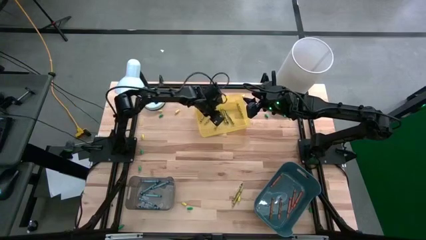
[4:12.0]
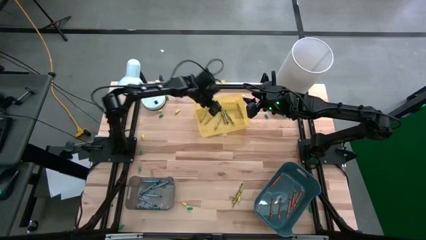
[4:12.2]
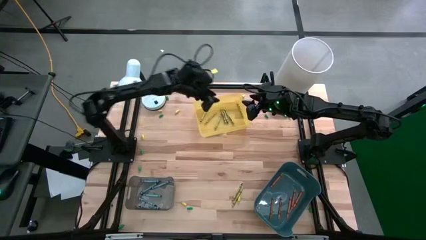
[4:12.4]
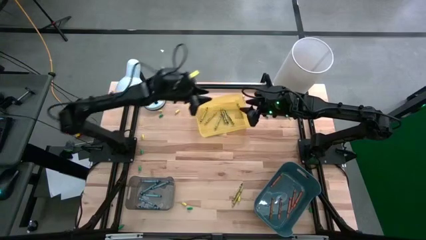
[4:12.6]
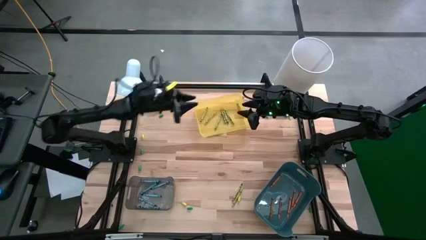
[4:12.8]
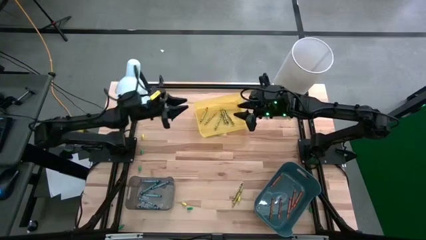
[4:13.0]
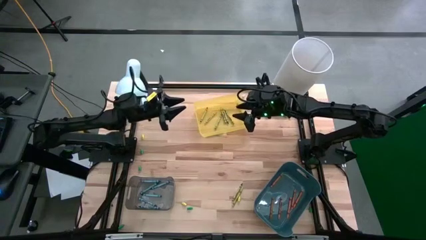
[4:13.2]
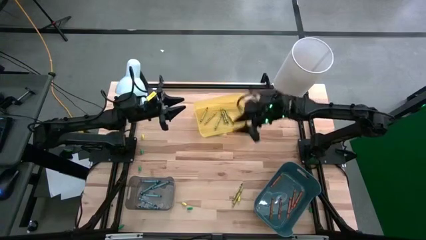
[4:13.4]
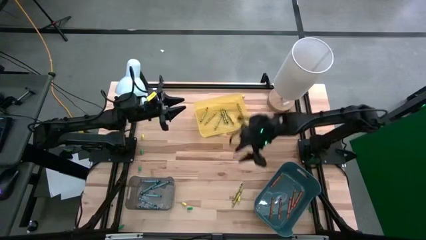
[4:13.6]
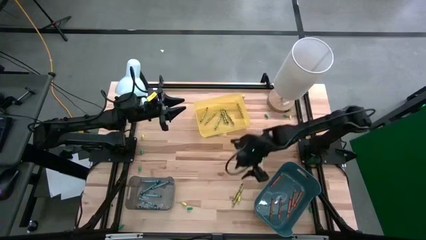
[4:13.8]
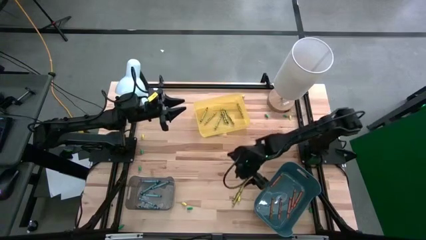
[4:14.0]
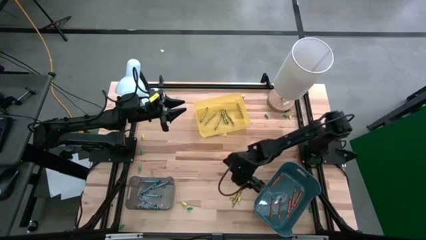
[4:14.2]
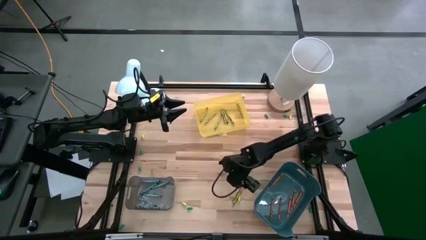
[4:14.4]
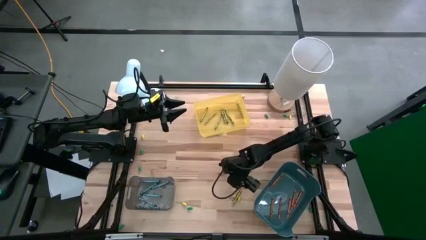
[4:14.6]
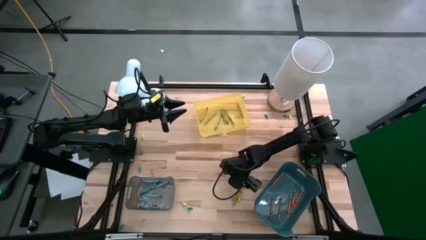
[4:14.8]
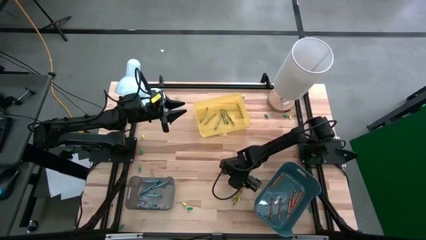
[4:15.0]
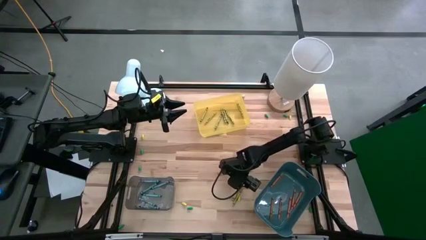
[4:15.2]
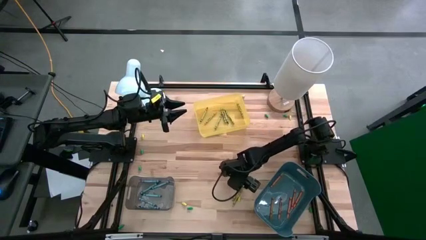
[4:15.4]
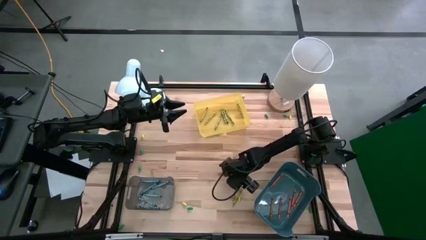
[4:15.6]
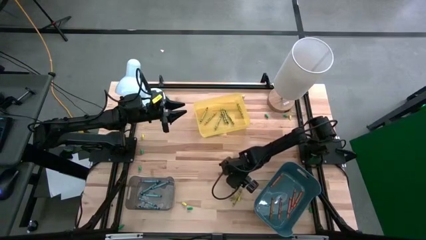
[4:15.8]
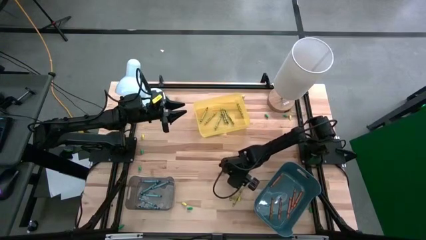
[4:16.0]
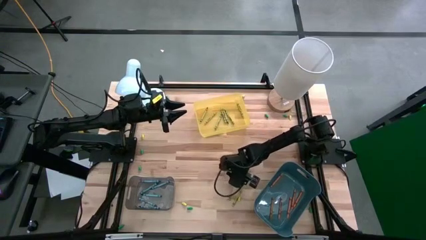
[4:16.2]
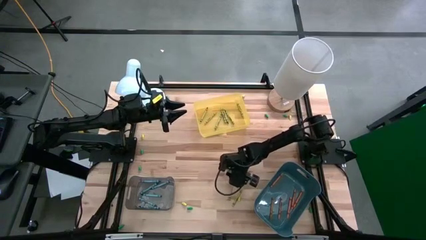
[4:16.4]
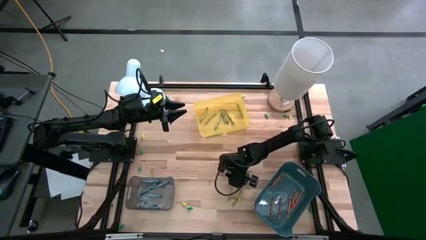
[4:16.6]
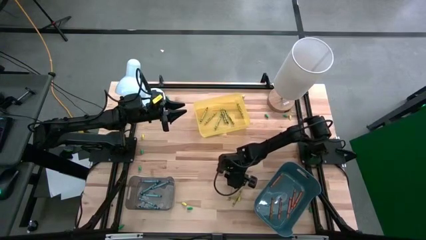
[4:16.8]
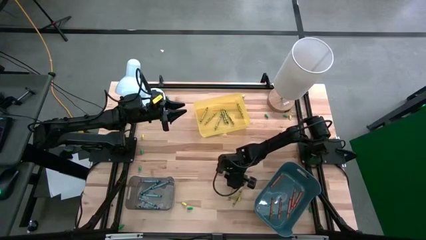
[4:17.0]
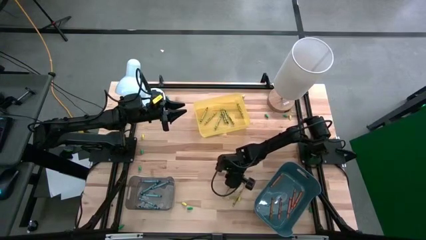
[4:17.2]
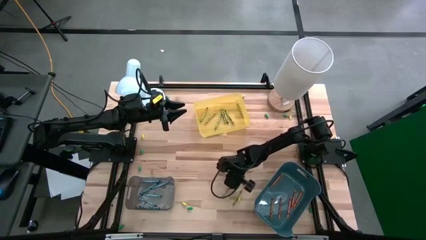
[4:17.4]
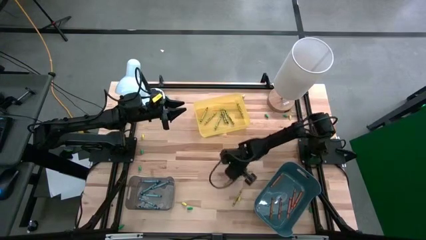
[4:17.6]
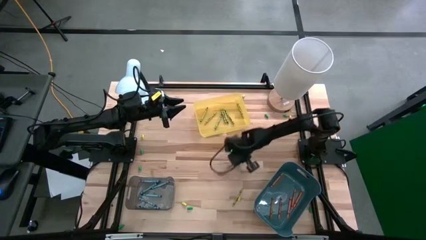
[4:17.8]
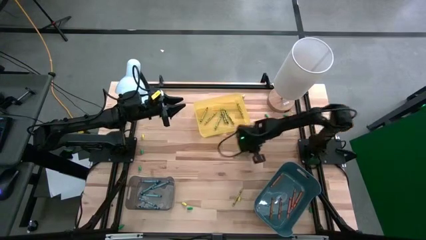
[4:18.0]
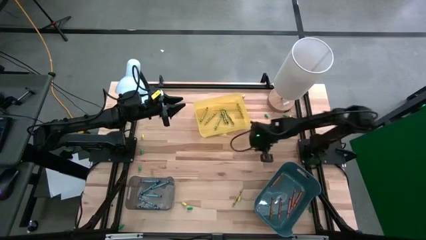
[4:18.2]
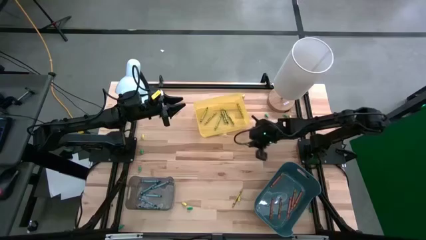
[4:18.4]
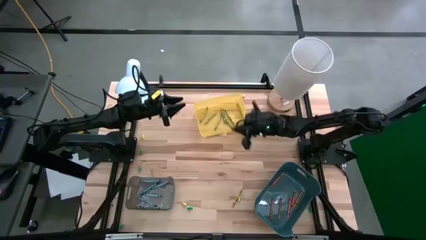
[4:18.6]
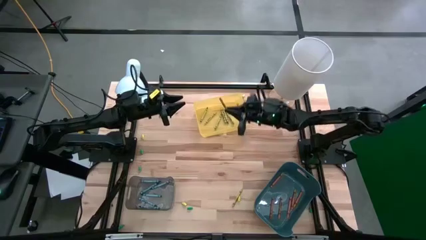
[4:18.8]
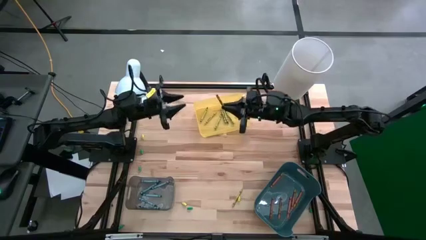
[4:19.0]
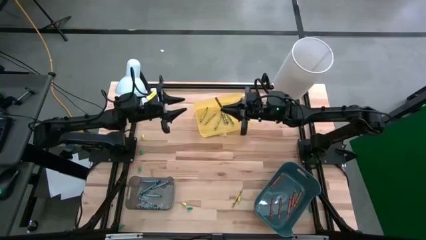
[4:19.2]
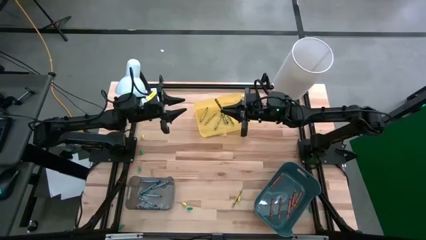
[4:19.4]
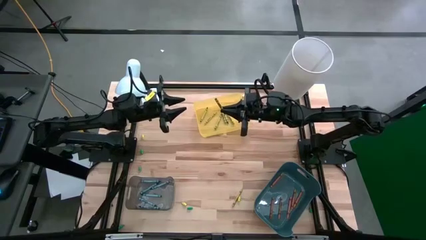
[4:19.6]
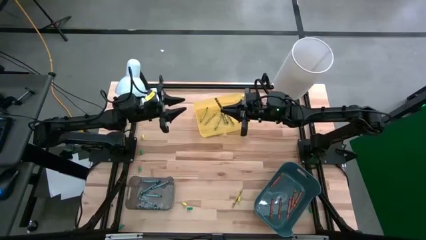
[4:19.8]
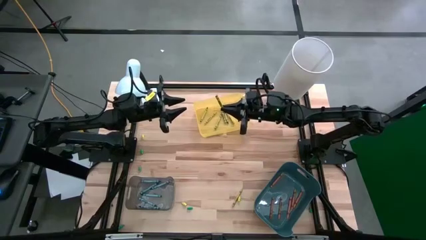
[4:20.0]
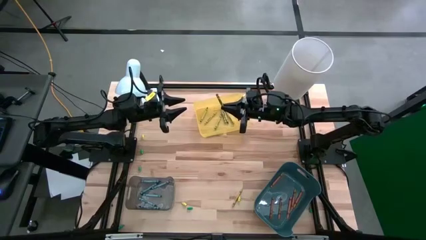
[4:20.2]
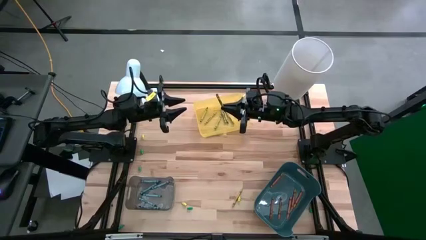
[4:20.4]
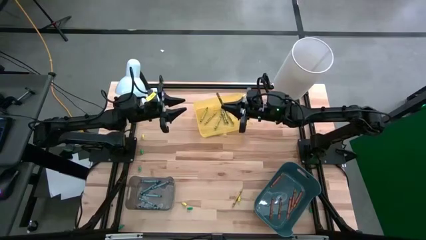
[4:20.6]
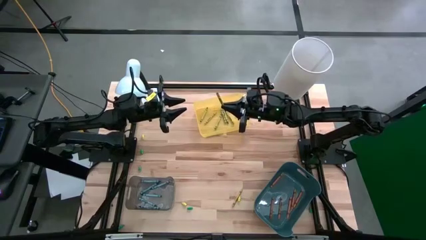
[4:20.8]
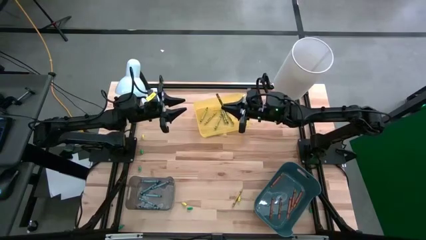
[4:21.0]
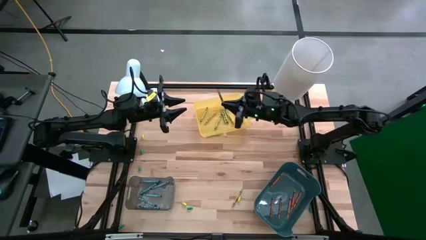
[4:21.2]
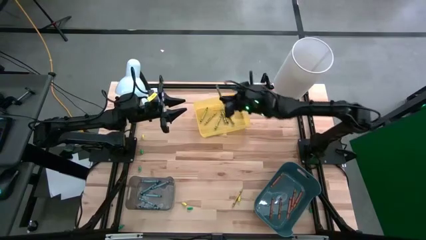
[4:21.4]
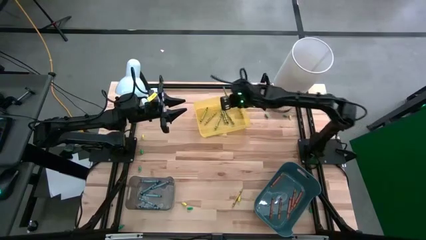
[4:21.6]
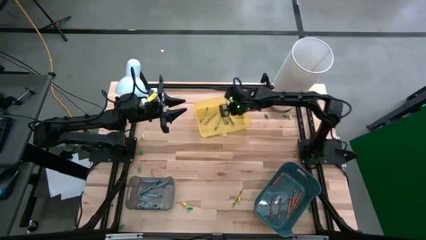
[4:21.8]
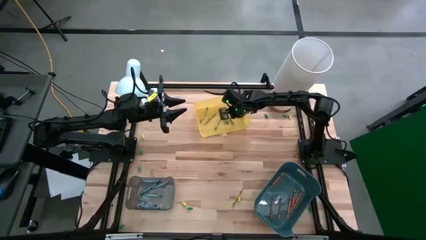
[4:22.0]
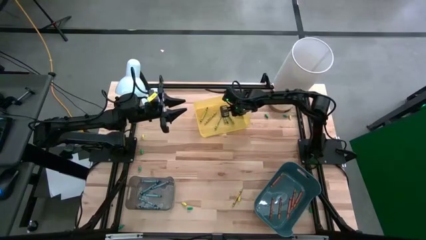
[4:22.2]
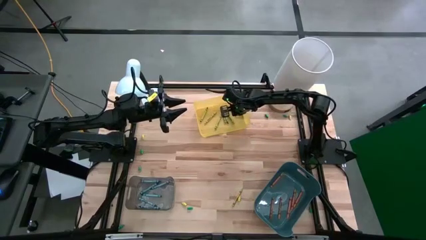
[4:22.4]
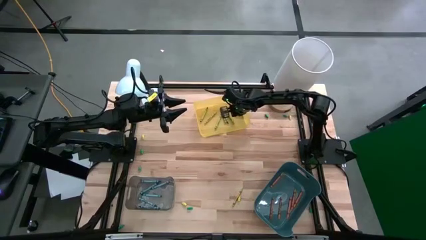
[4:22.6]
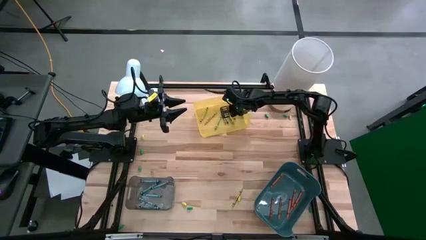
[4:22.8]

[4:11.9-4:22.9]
Task: Sort crayons
Put the green crayon into the yellow bin

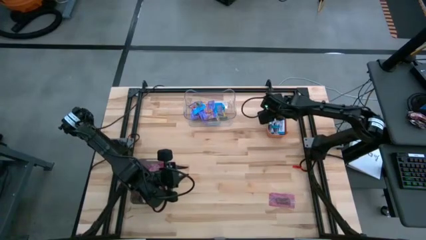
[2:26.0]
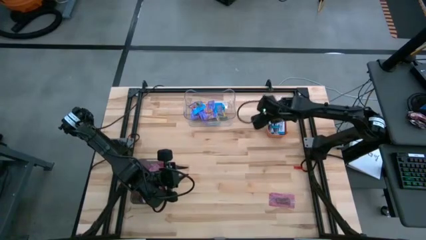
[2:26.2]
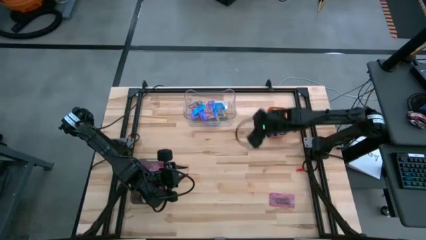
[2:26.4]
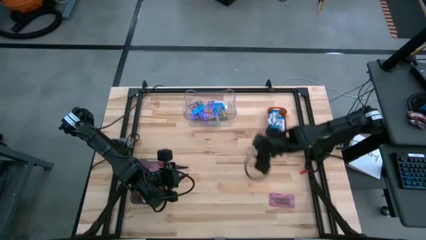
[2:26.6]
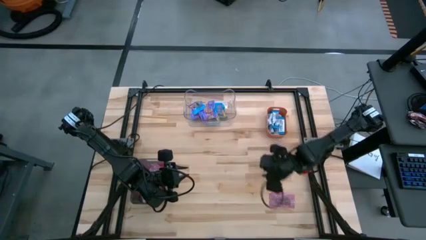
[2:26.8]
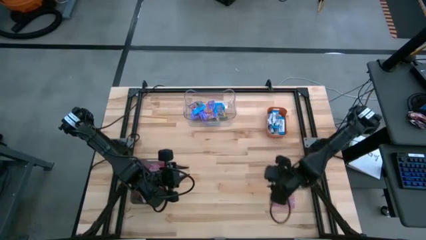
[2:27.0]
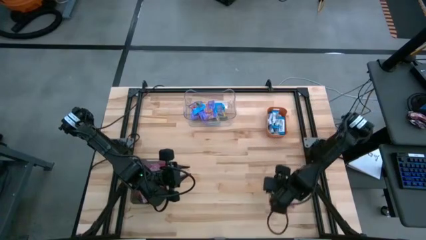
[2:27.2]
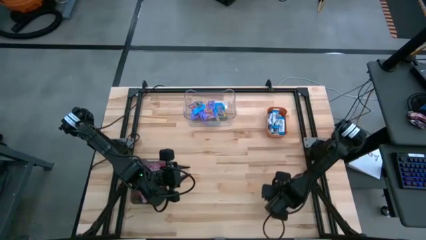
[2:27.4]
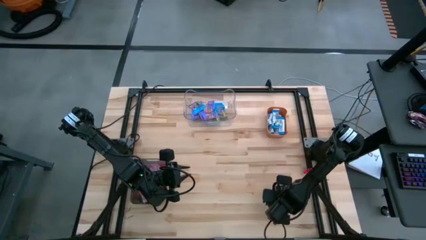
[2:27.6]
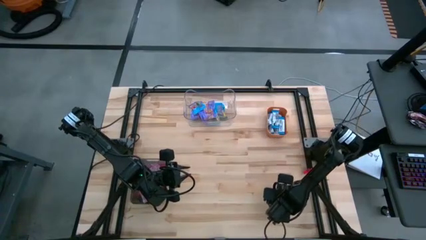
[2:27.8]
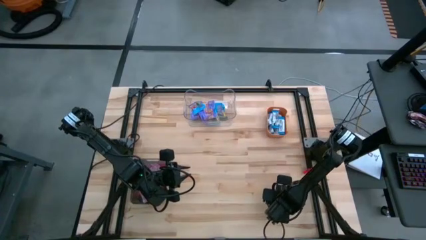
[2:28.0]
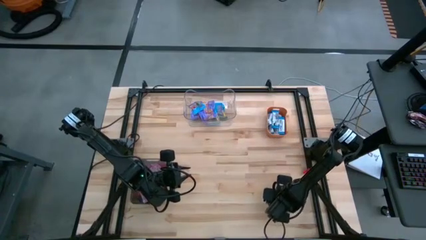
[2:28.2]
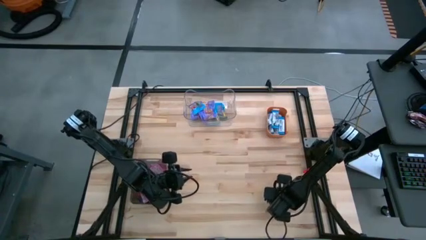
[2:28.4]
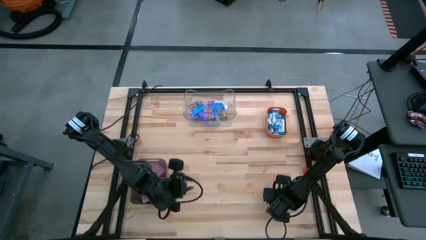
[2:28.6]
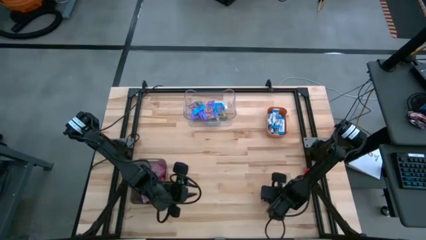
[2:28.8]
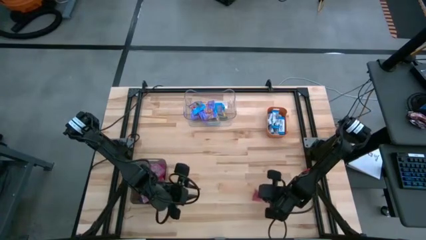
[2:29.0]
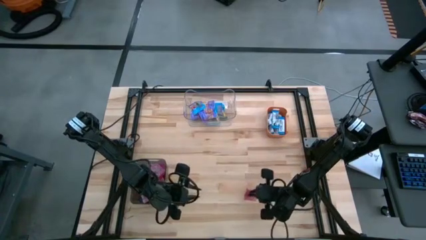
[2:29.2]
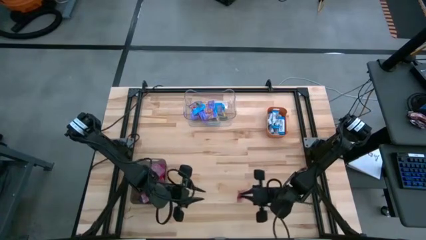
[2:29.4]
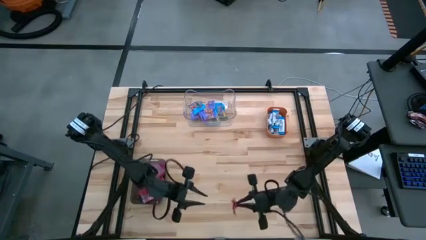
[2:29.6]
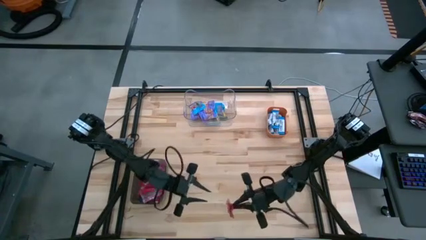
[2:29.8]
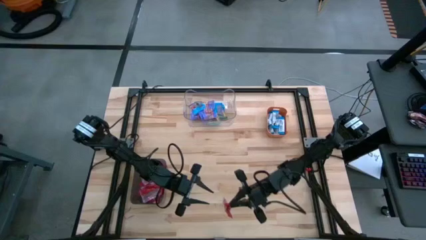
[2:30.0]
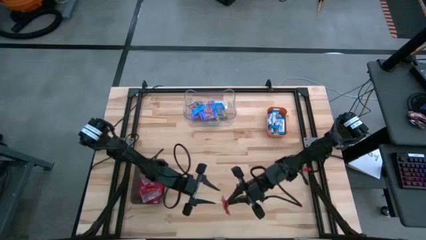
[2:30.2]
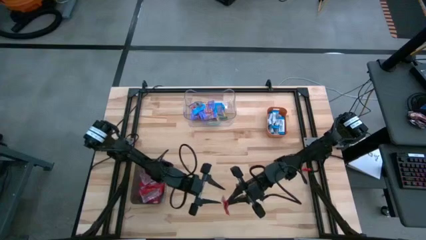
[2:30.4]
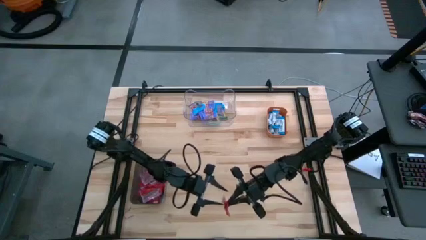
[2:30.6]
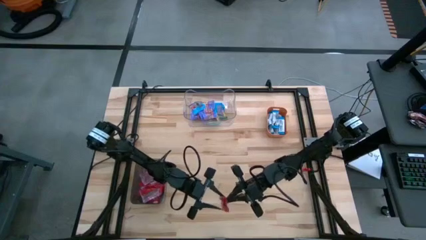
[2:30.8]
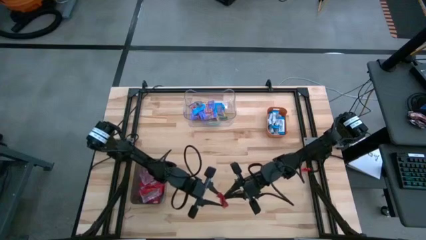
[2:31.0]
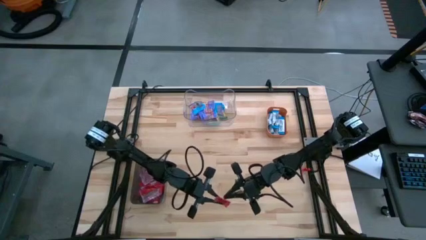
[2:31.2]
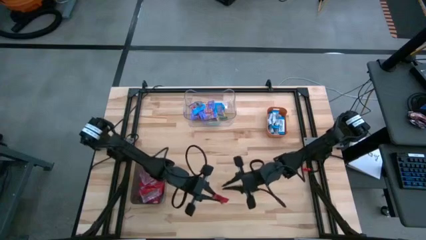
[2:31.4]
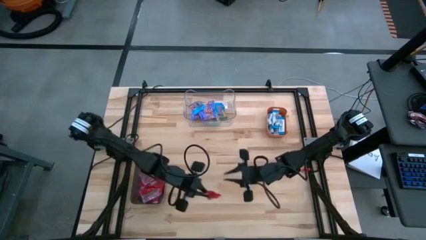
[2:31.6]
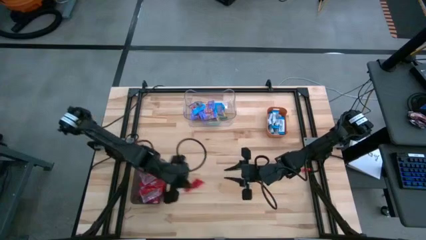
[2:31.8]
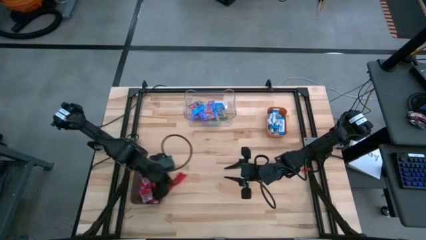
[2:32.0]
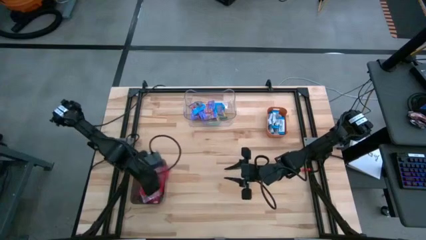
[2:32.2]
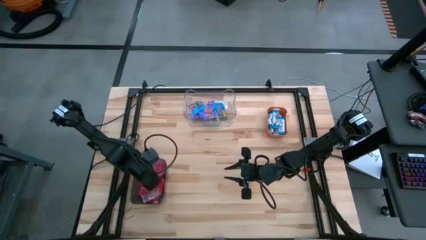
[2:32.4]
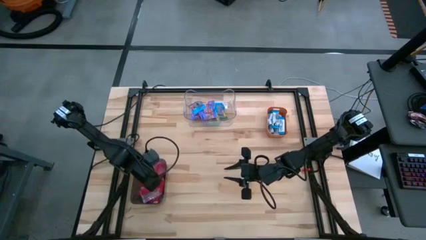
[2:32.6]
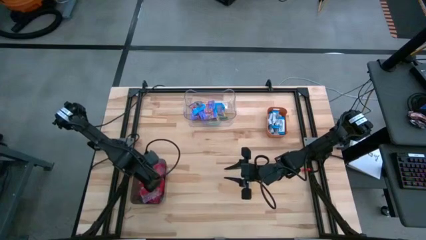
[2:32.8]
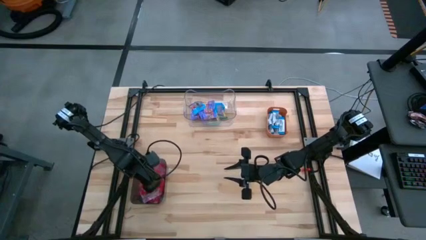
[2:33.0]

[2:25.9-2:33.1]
Task: Sort candy
Put the red candy into the black bin
